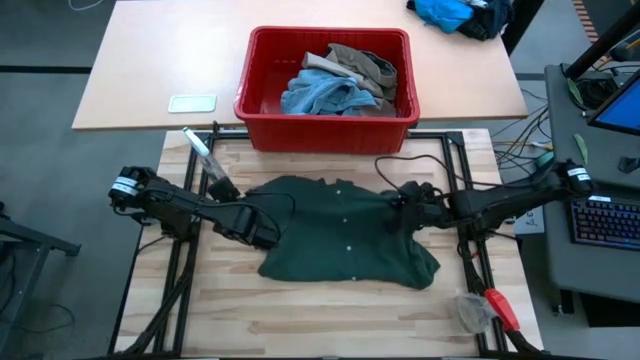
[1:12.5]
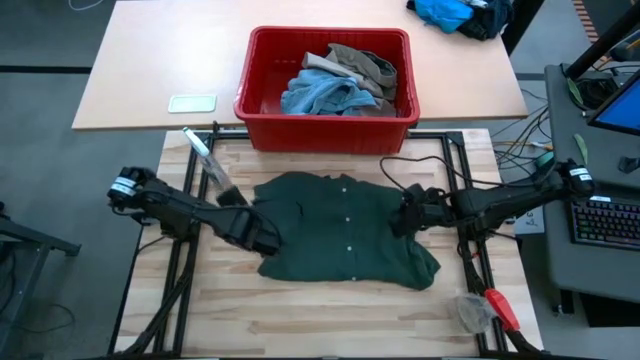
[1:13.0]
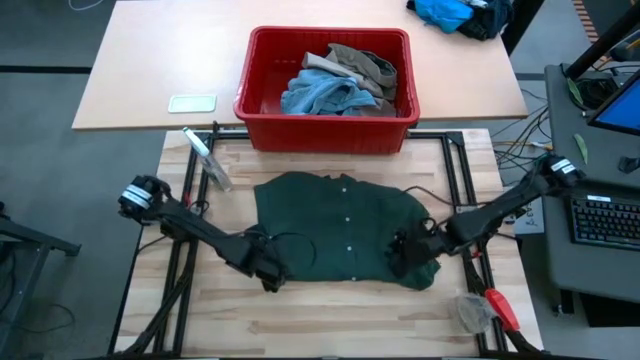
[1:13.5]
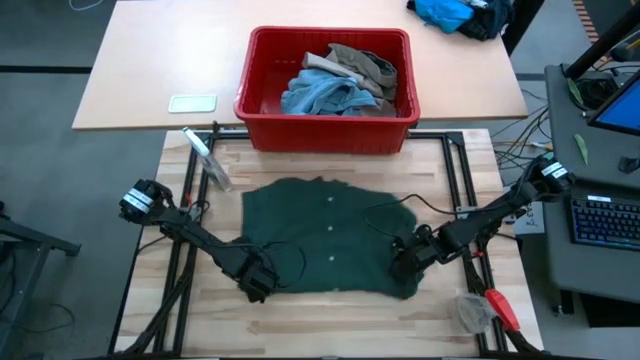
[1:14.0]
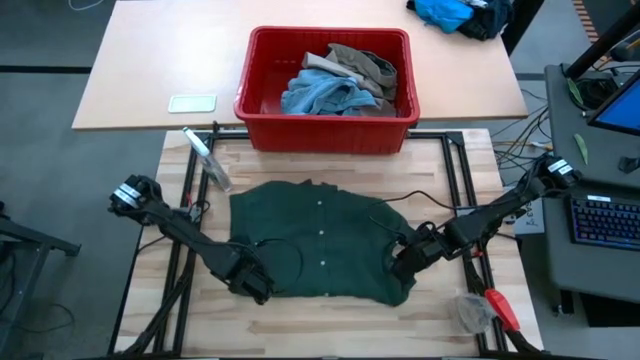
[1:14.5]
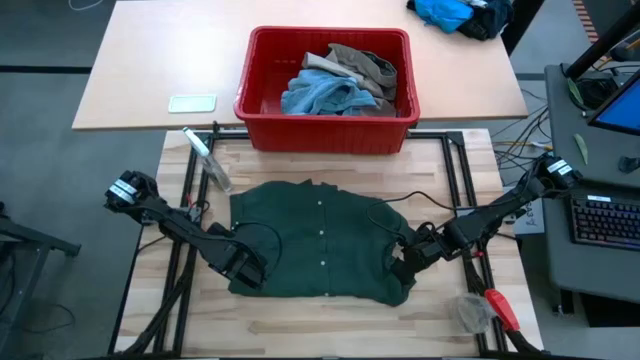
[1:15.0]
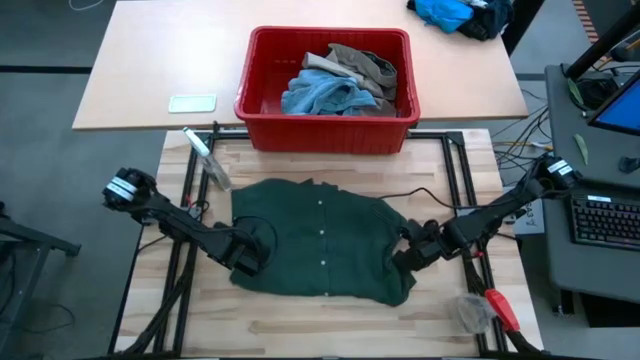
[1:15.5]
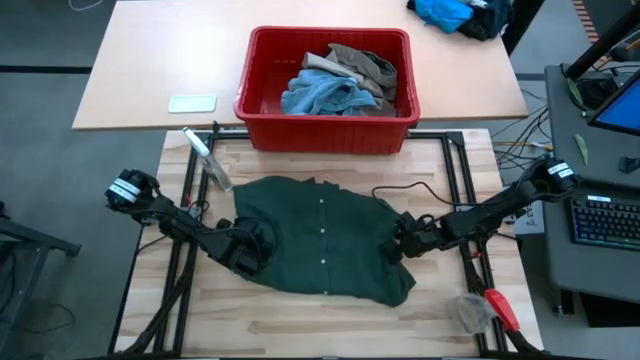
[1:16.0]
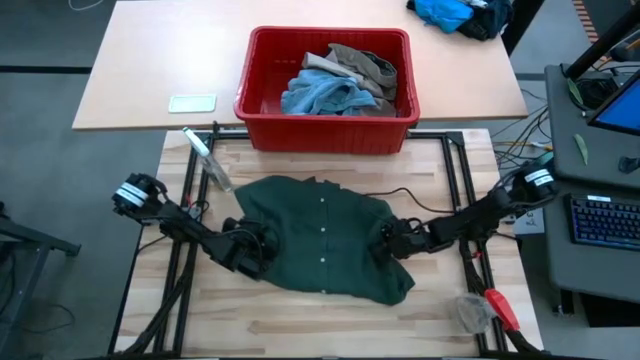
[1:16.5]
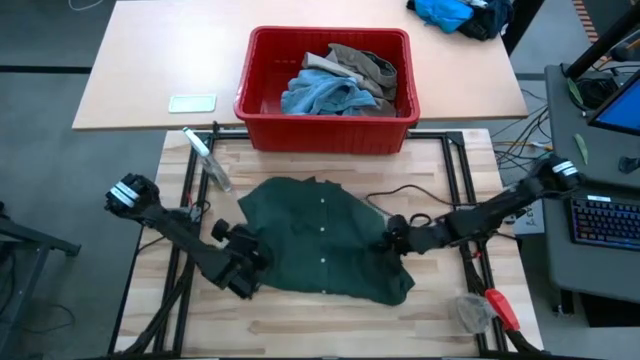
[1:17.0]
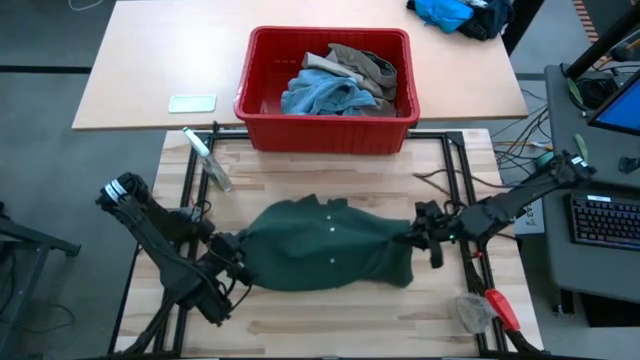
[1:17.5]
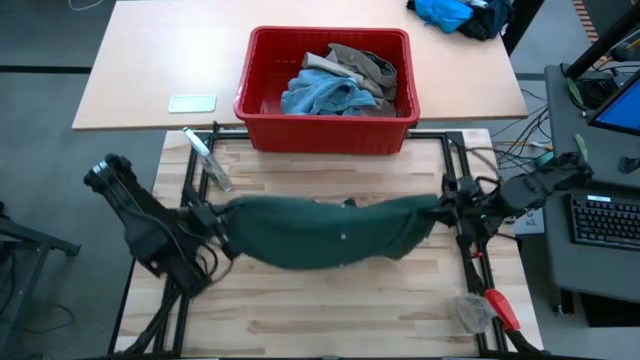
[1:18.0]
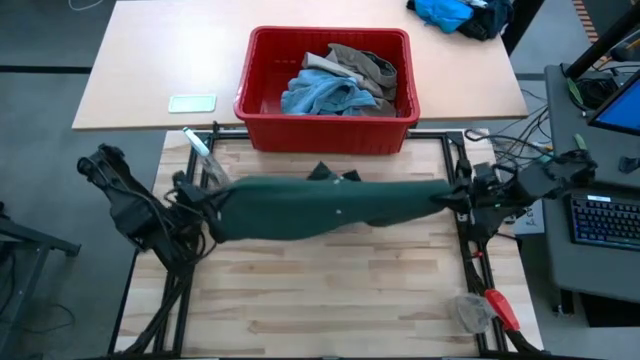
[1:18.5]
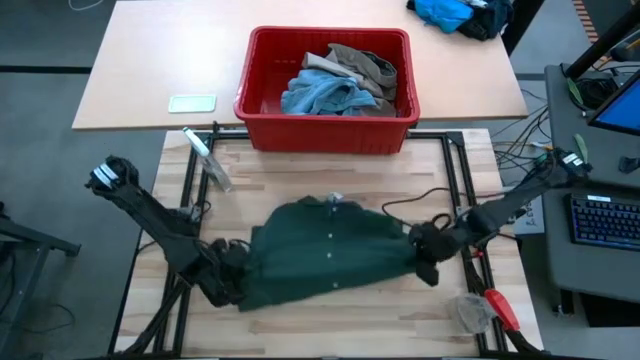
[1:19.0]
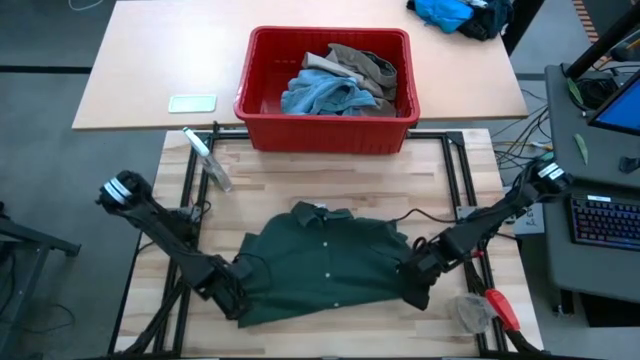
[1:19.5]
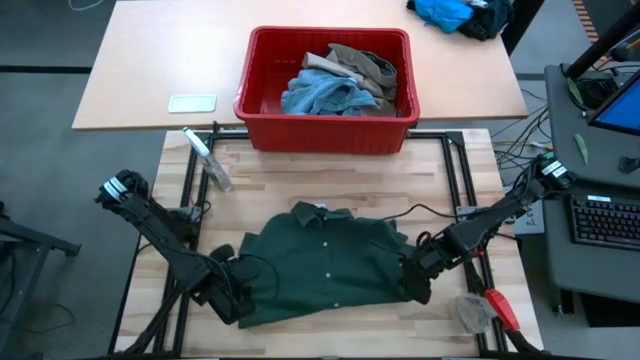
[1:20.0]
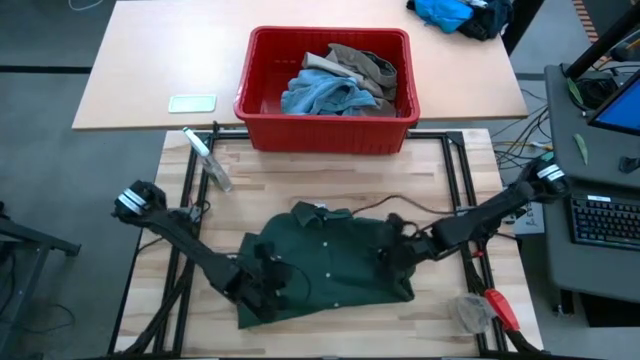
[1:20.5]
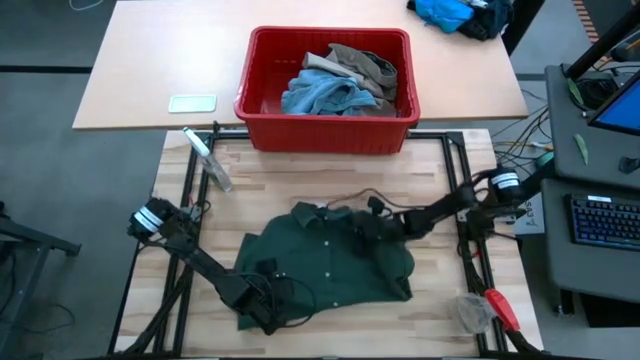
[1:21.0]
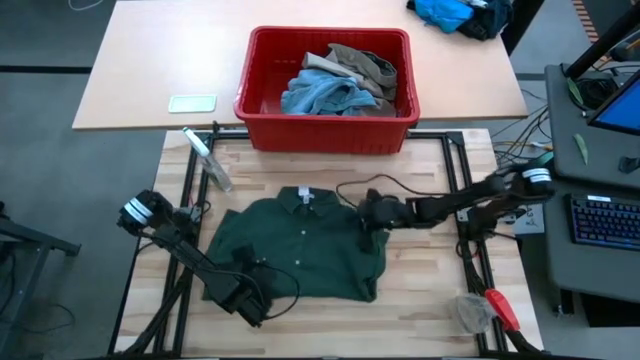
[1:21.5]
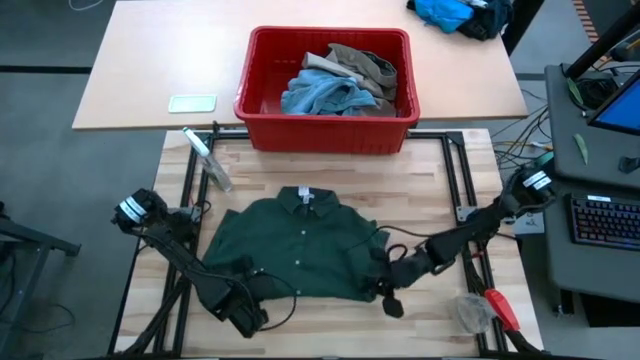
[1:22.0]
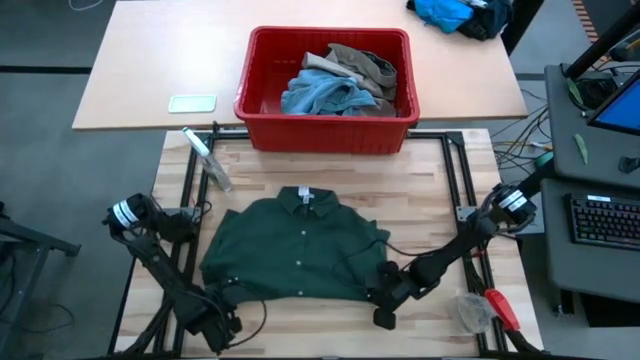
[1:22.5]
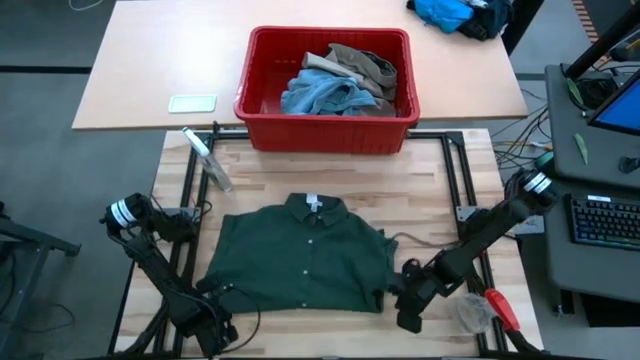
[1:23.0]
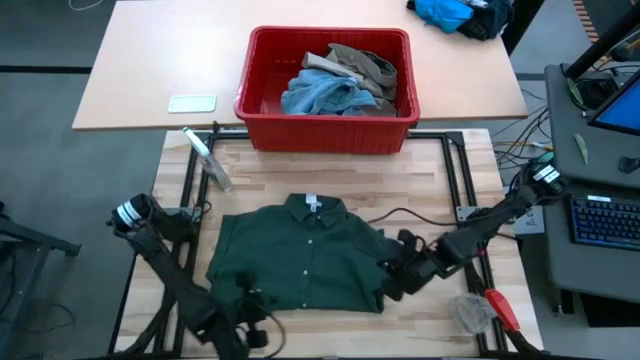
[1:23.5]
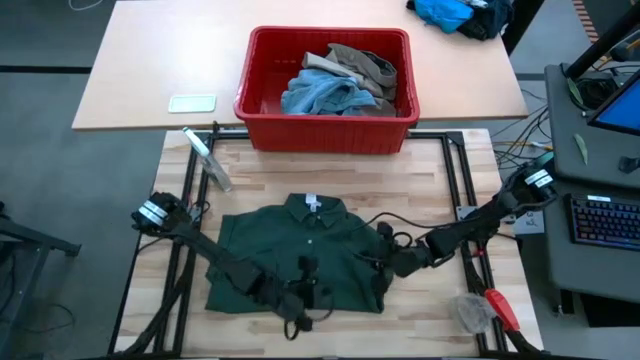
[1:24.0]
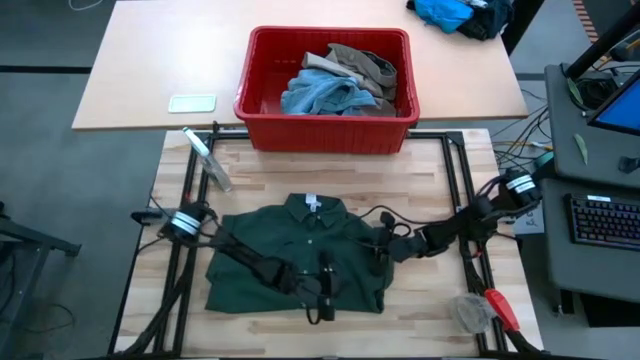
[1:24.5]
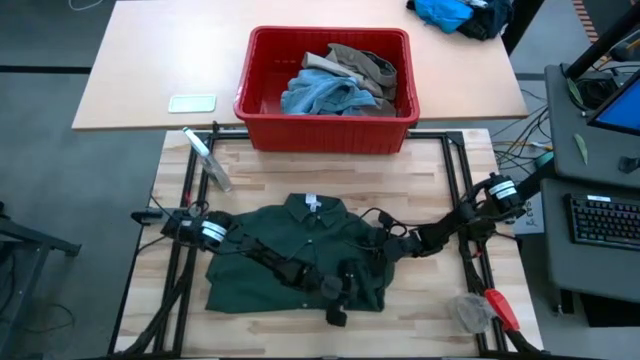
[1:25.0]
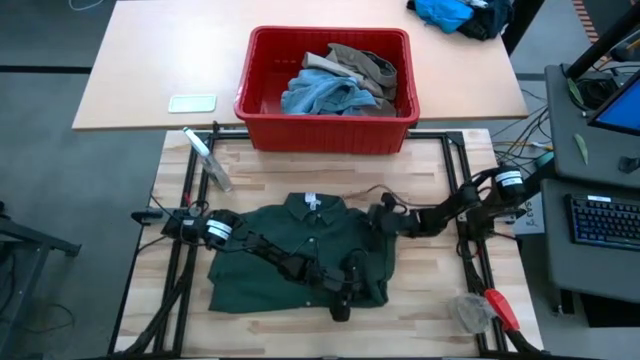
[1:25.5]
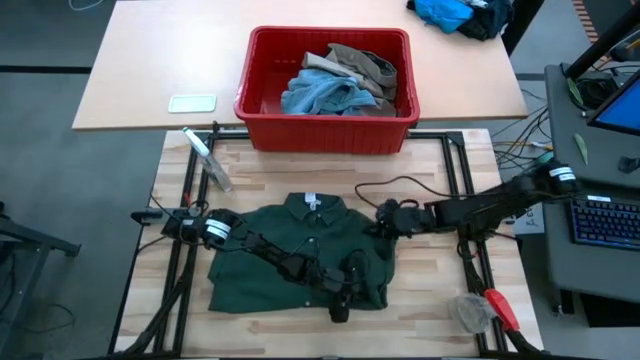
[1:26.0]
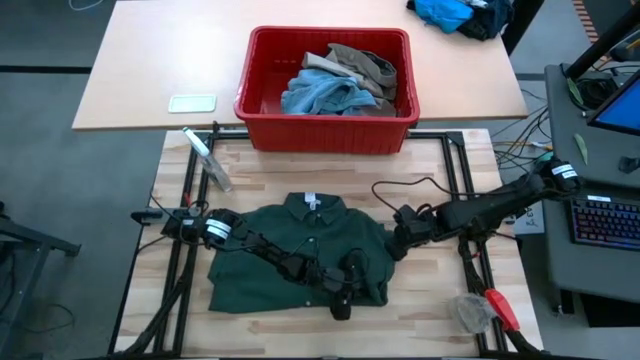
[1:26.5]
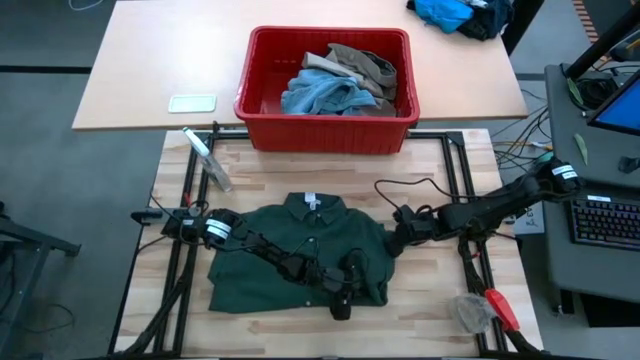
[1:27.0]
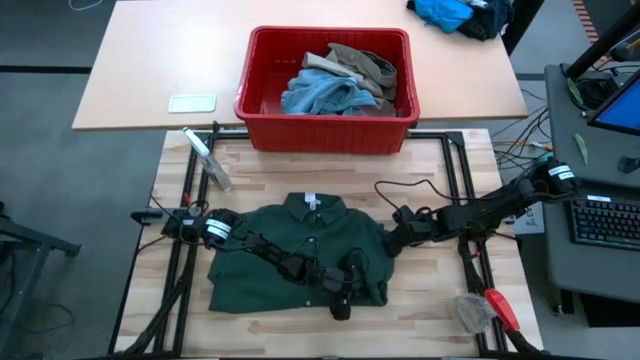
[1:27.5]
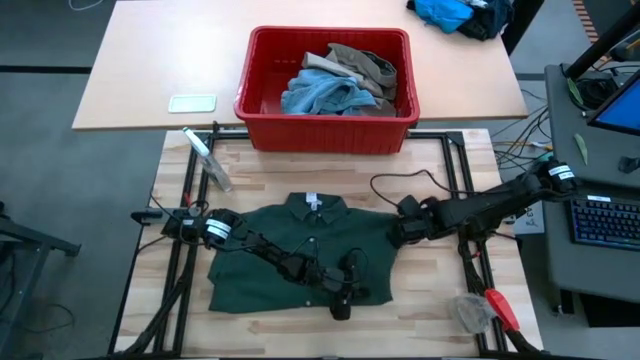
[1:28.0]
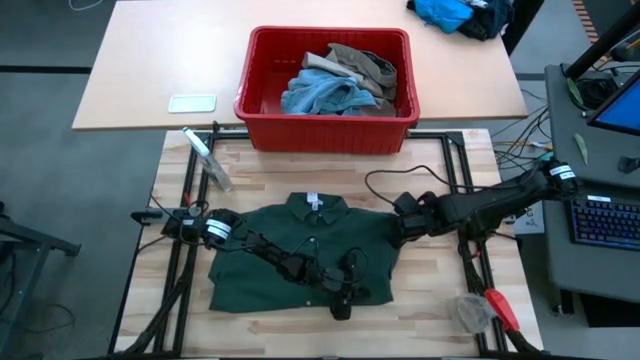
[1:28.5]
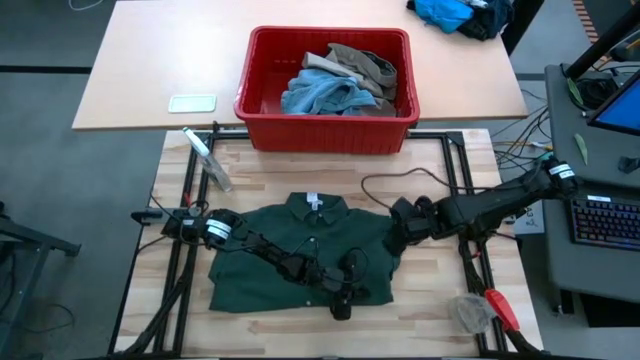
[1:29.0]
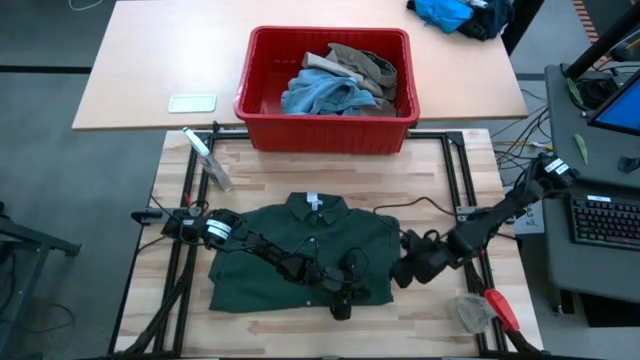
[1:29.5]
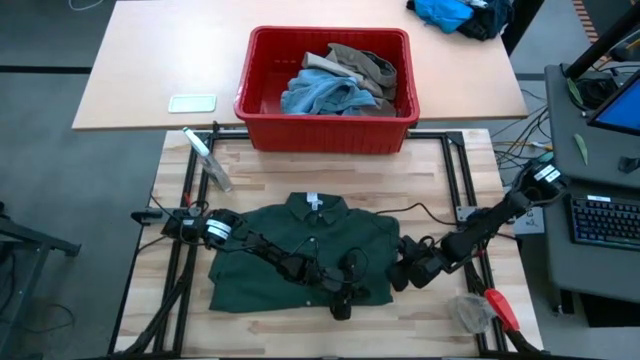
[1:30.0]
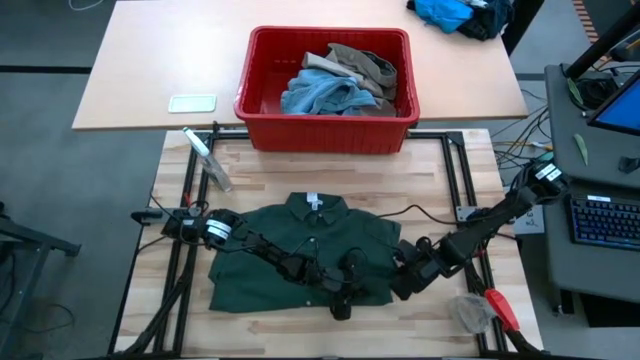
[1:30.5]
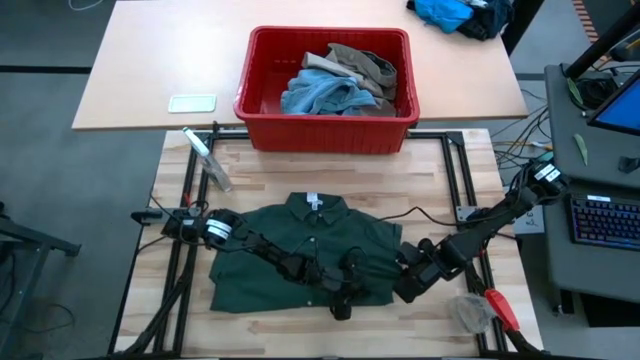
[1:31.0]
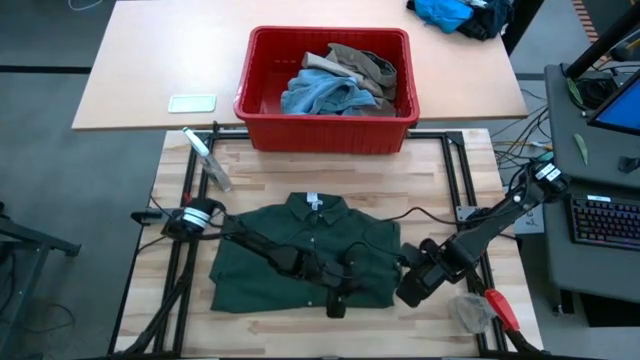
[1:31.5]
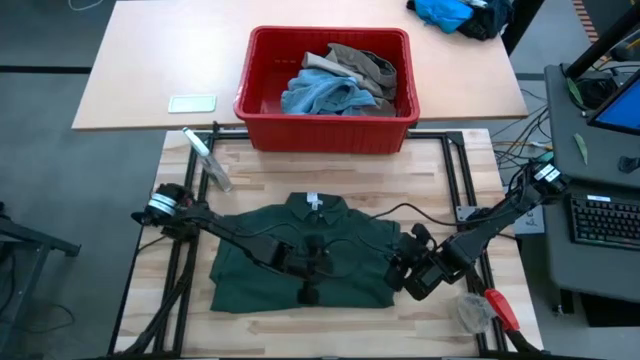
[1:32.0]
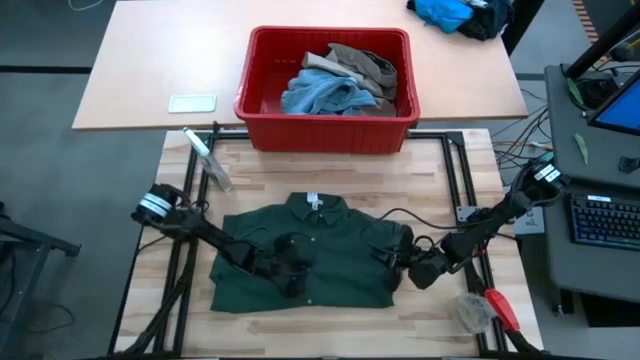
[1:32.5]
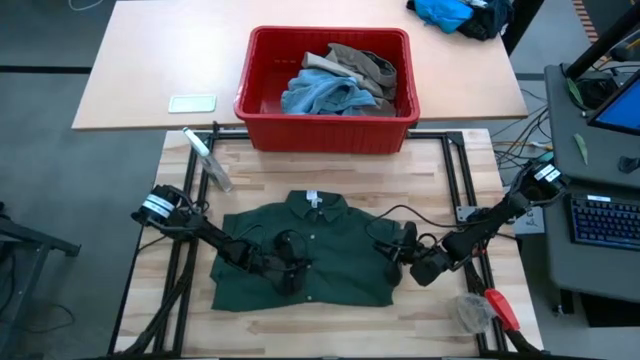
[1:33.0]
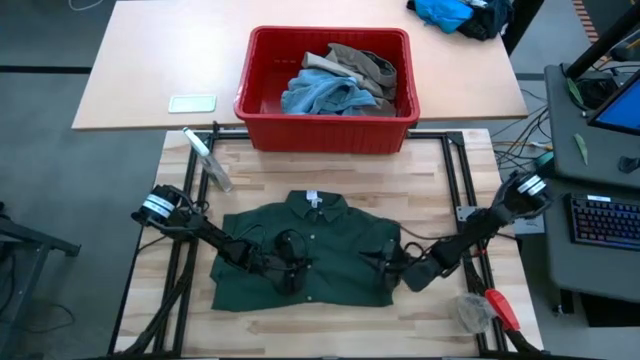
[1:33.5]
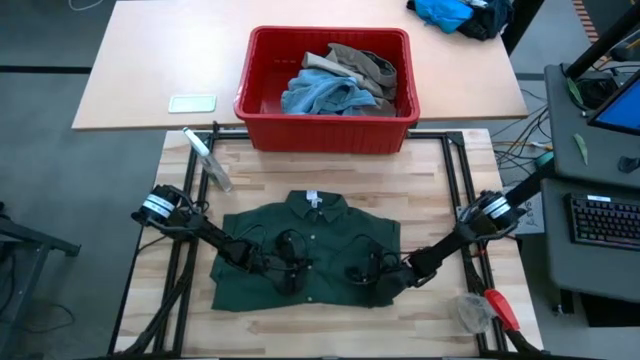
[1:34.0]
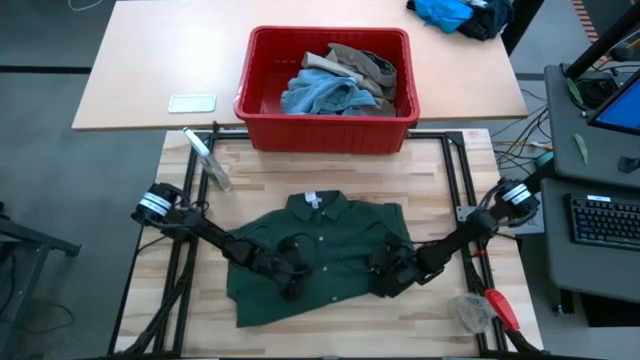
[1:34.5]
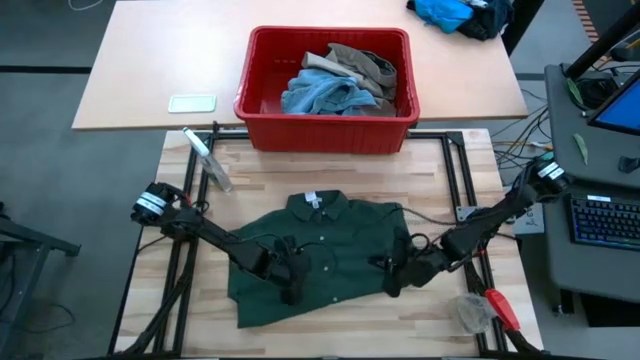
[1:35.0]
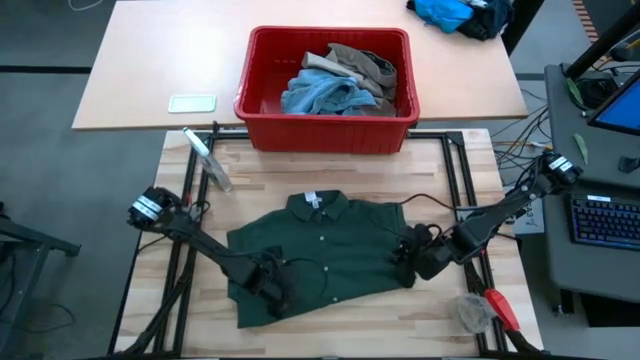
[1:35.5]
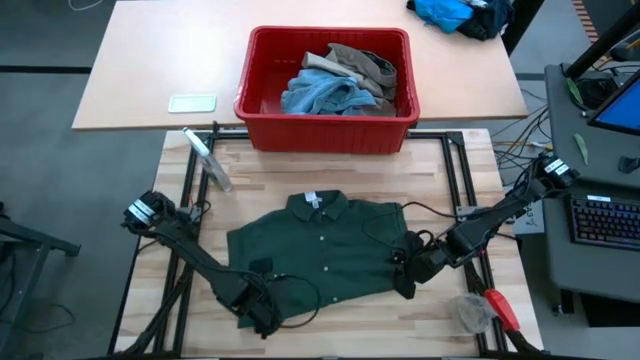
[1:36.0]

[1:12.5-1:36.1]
Task: Fold Laundry from Bin
Fold the green polo shirt
